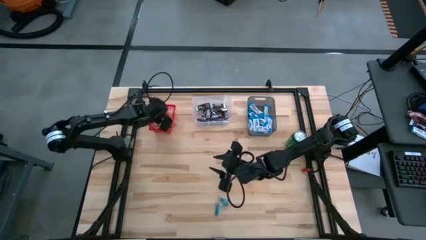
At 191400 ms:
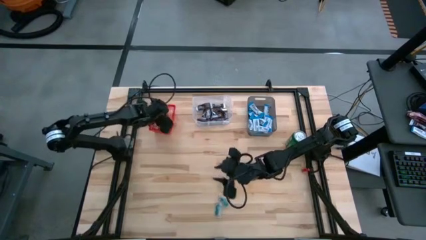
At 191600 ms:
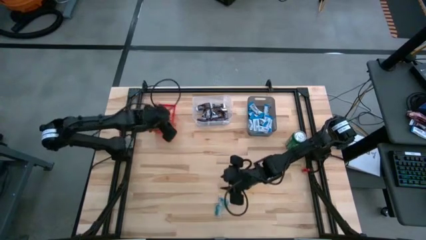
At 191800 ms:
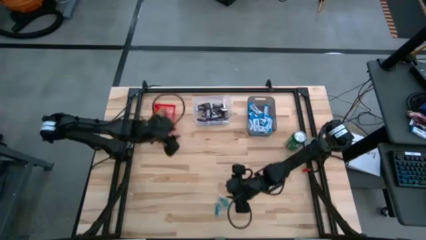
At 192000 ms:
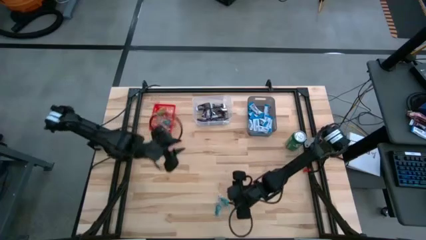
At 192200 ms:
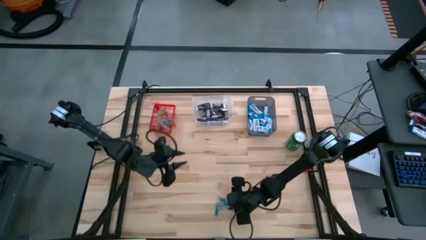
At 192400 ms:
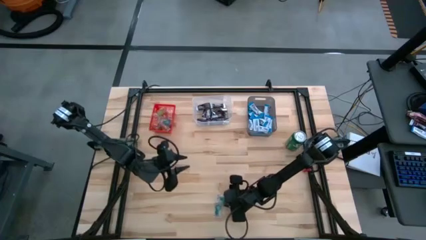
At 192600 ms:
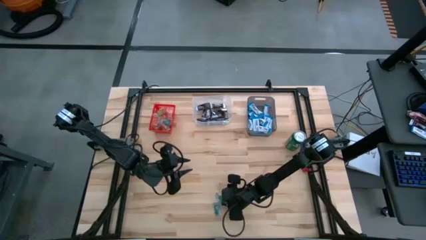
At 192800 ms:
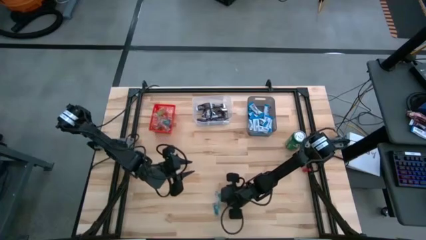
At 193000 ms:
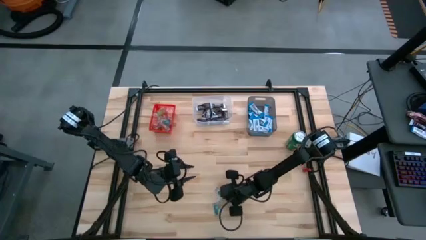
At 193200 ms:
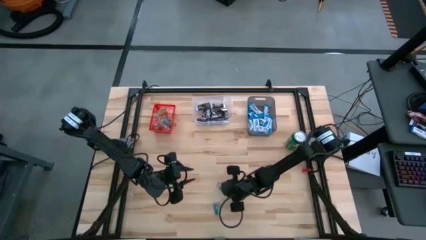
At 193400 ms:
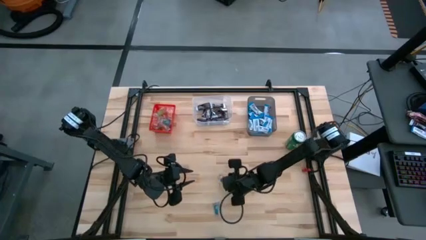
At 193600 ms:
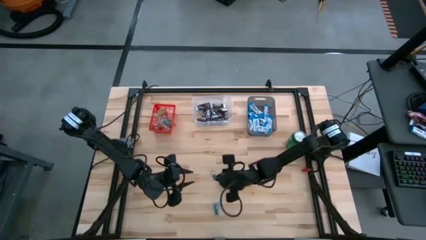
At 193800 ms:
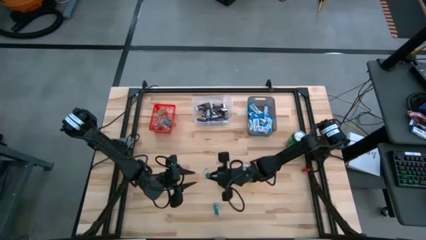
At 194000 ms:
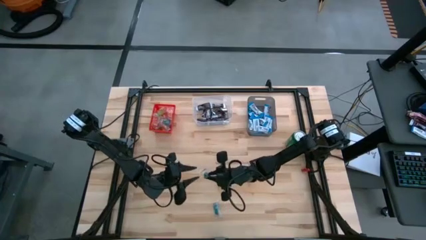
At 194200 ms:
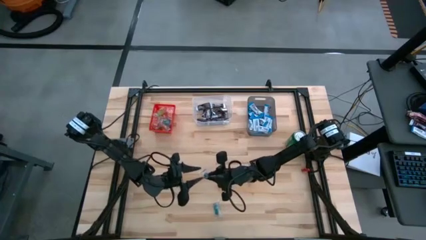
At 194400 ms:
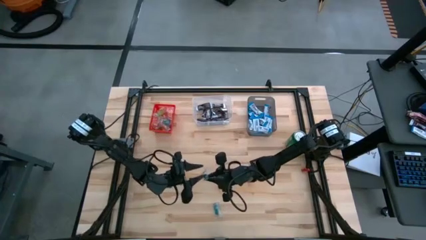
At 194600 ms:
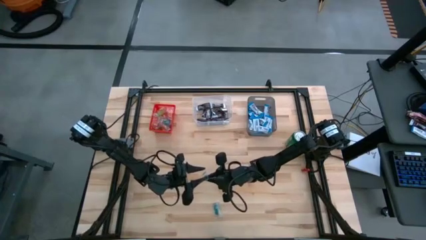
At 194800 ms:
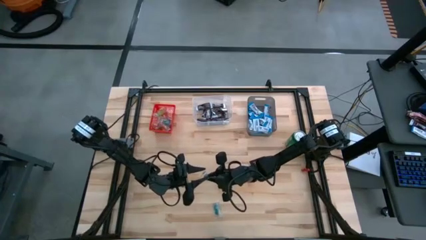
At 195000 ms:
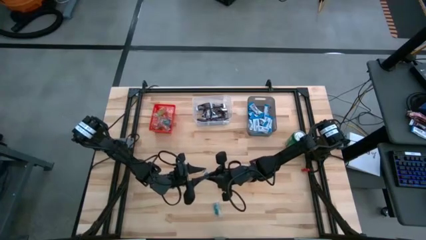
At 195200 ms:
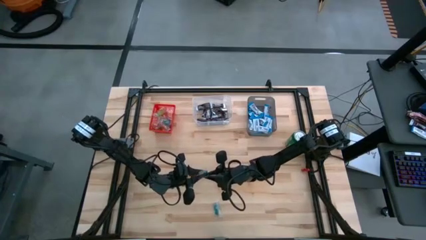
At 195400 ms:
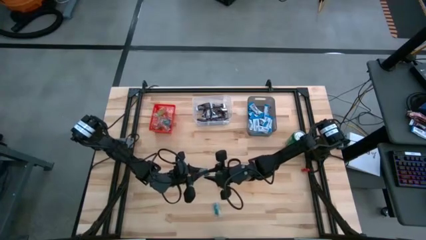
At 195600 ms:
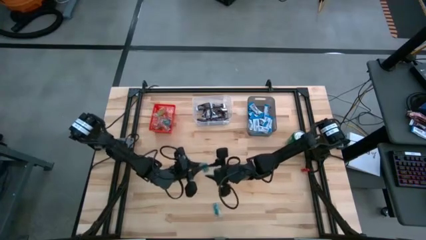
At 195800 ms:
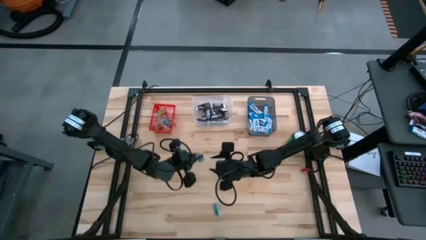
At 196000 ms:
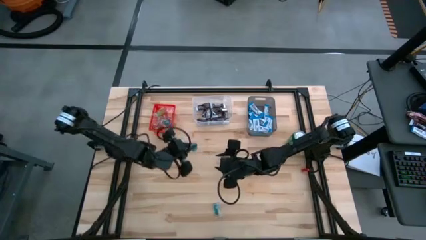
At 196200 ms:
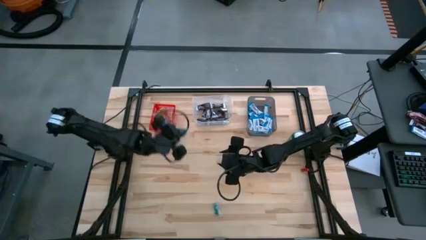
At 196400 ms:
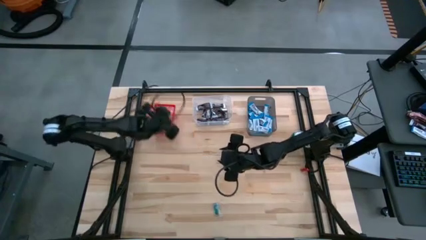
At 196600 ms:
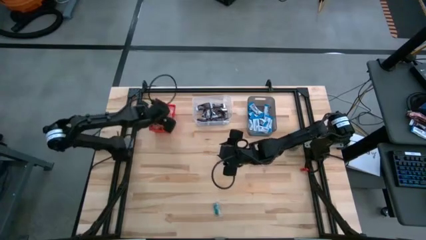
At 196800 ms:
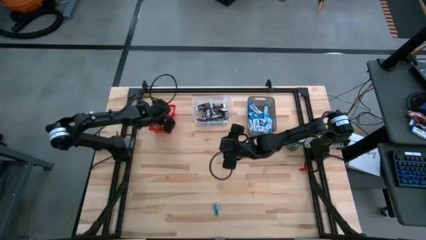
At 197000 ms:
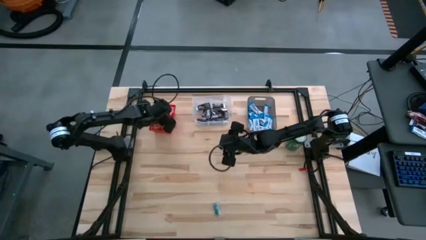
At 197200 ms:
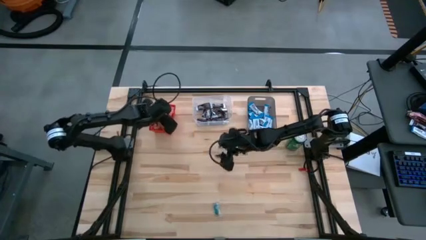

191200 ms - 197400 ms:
Task: Sort candy
Put the blue candy into the red bin

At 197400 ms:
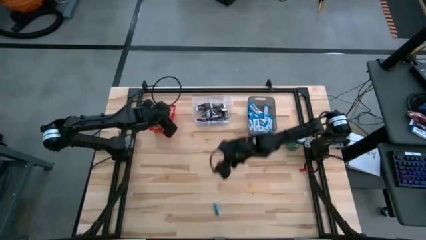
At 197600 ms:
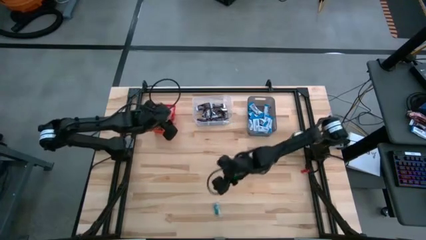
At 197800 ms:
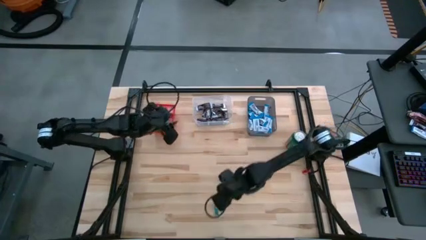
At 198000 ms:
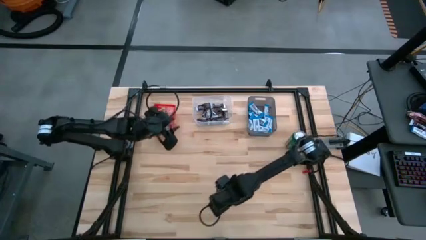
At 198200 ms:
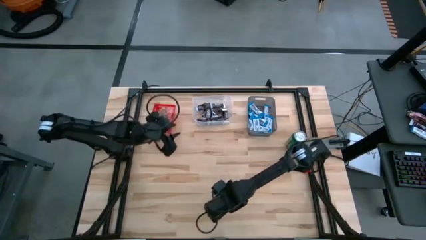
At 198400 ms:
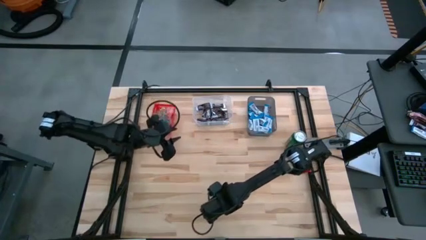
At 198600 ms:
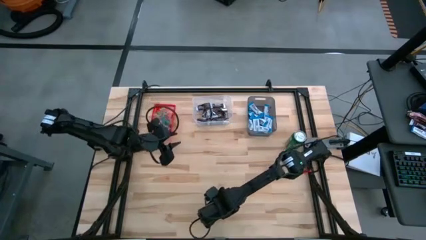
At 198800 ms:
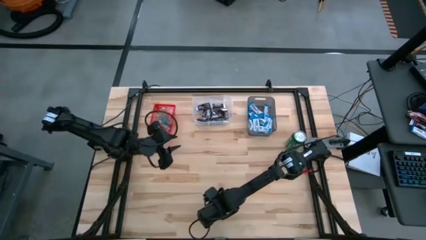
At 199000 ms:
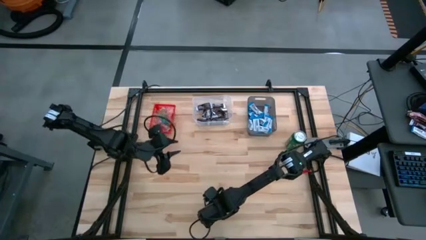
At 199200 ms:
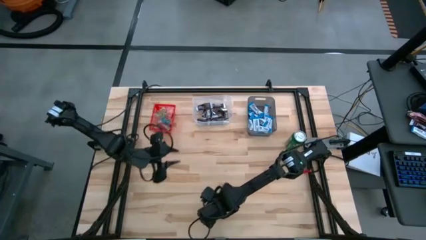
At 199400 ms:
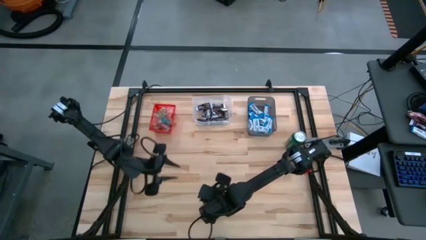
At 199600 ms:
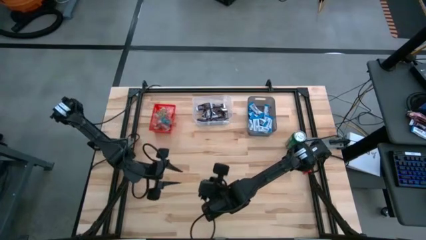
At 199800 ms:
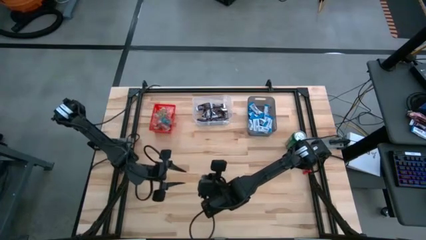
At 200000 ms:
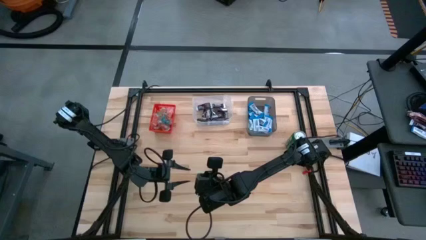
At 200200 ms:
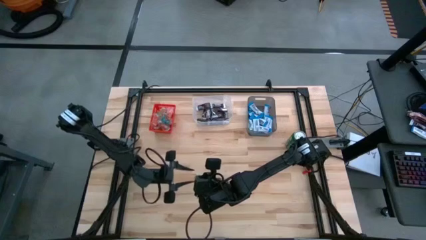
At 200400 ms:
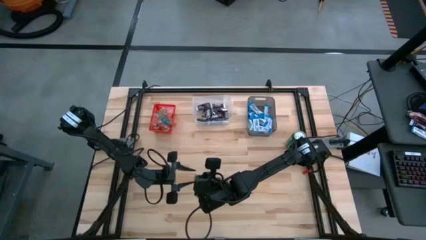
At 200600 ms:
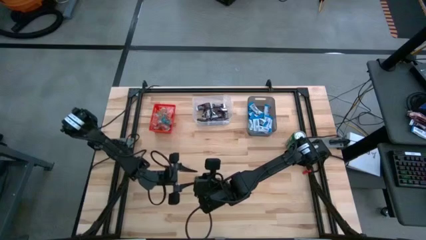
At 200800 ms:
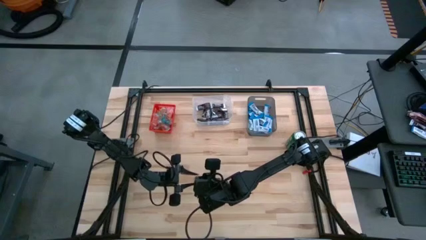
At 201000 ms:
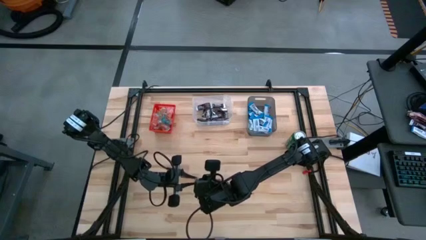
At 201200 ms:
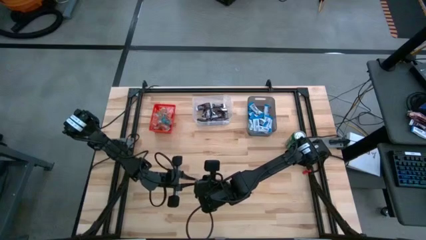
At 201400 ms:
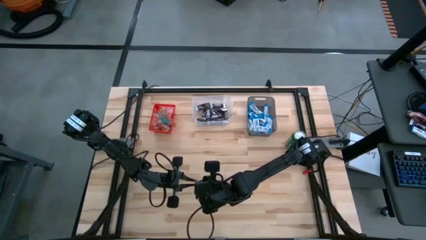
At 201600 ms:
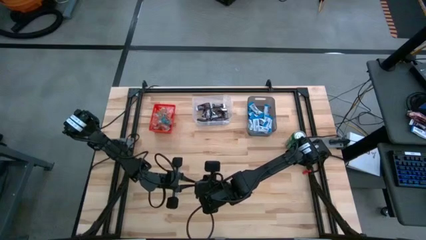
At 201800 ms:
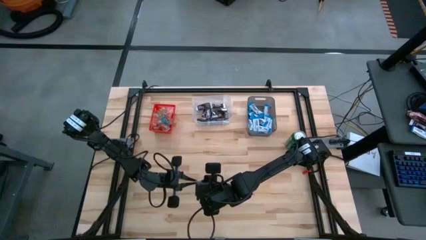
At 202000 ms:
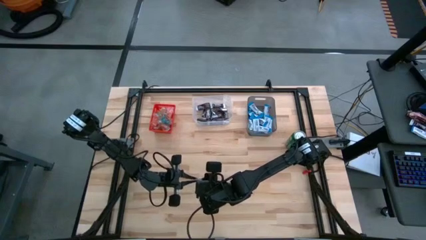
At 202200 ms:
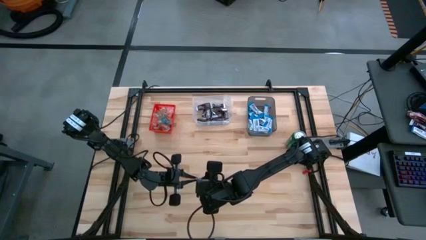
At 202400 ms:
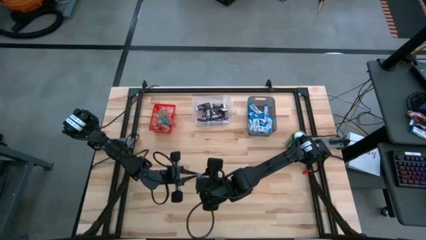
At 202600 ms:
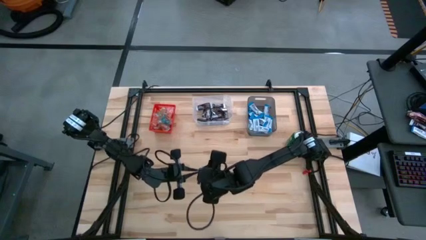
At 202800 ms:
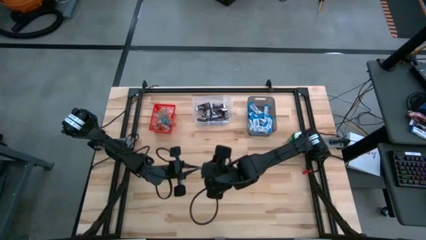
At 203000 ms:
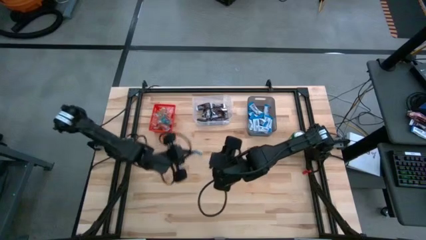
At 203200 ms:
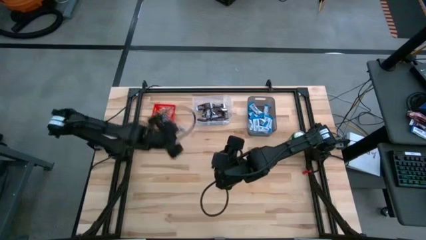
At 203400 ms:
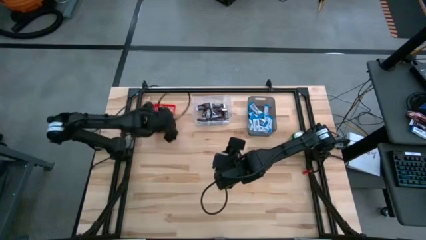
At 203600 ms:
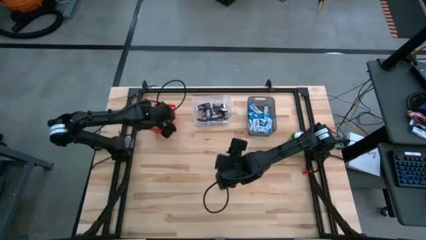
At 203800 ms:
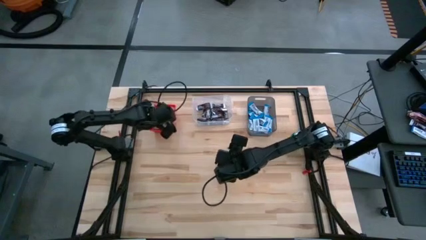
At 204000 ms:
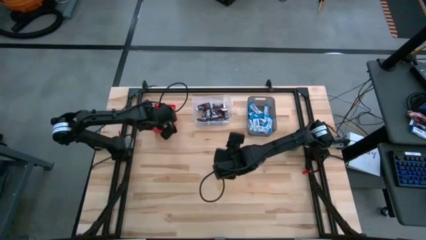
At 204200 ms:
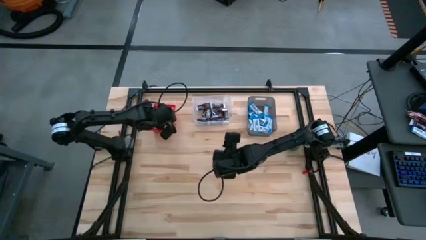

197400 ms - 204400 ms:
Put the blue candy into the red bin

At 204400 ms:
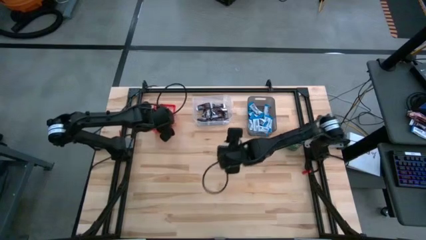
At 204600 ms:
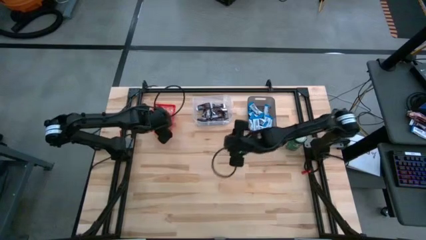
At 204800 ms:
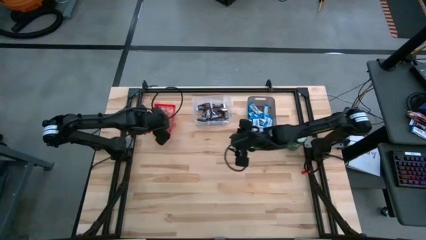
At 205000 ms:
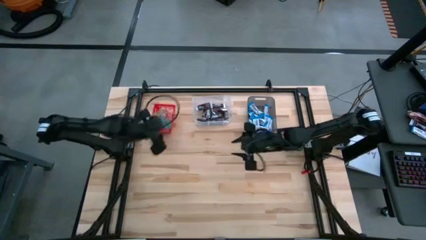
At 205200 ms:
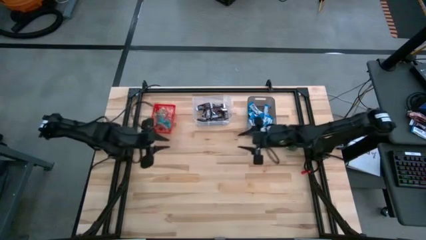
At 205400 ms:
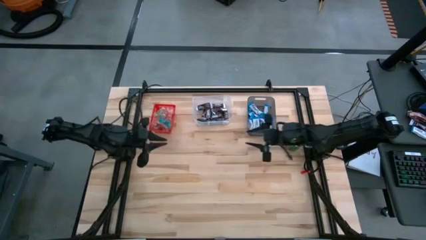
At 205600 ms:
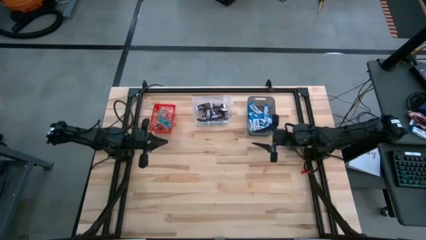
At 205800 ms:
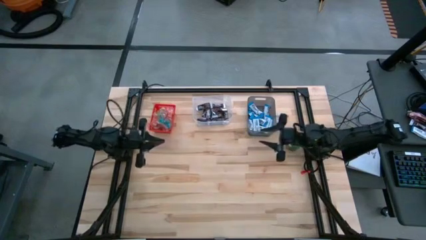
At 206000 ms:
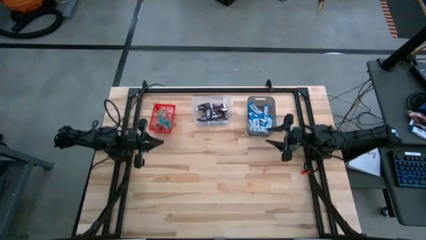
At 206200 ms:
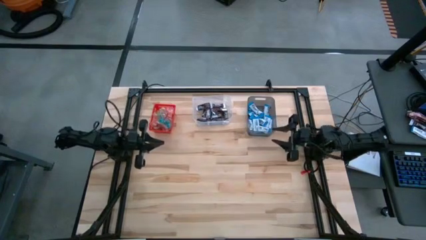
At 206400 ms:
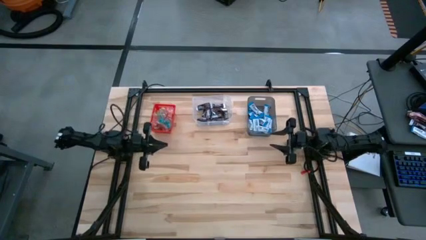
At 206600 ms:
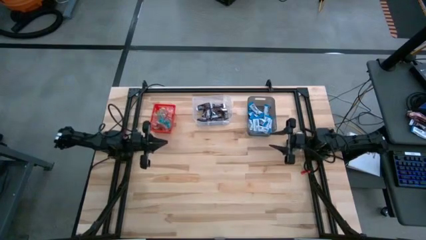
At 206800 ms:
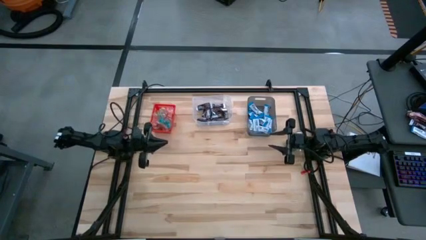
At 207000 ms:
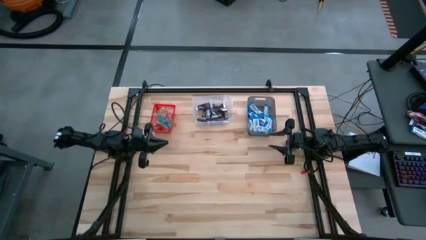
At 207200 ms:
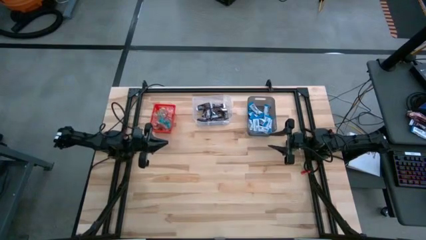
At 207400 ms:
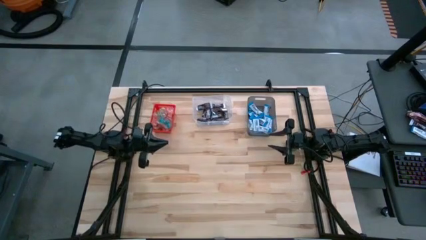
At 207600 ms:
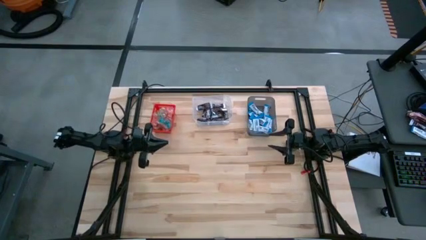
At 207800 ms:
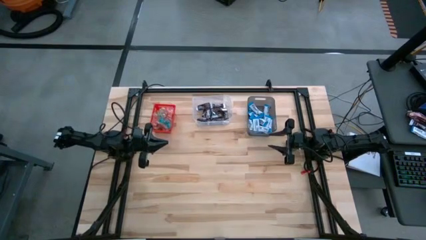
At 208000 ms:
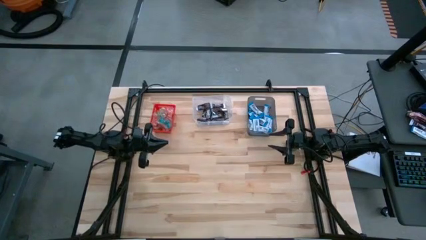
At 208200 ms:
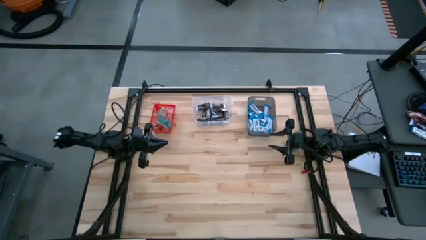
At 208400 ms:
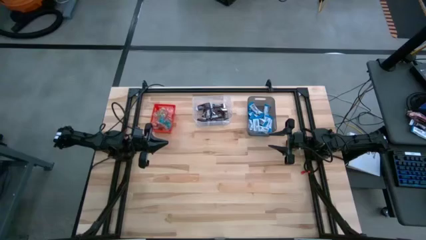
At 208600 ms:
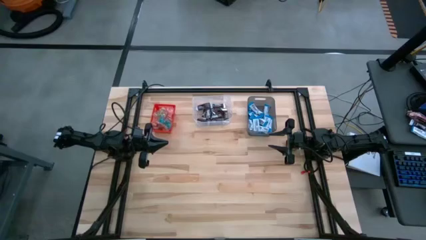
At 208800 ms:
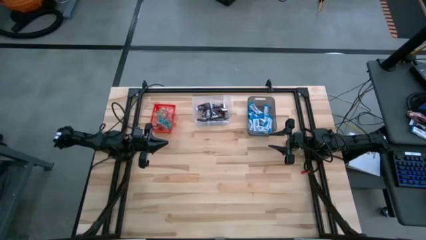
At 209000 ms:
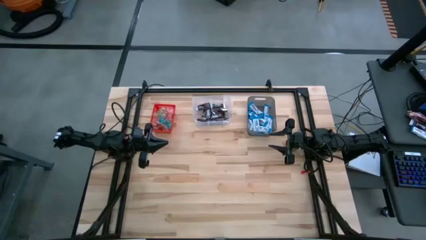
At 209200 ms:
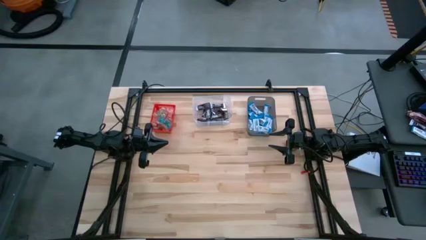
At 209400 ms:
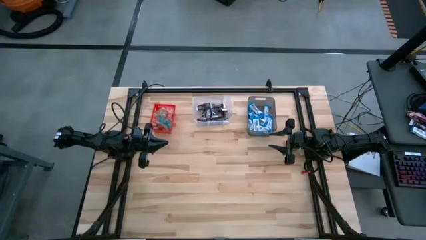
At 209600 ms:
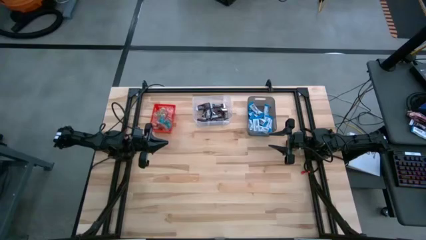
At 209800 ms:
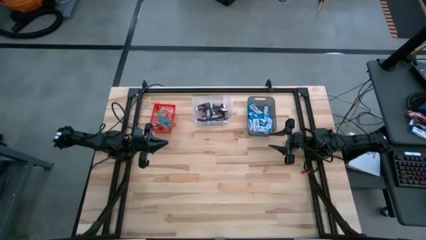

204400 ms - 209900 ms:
Return to Home Position
